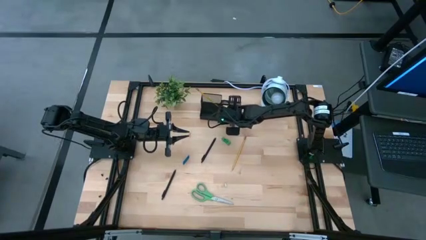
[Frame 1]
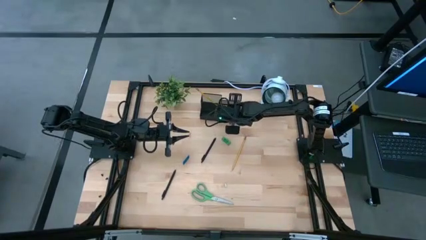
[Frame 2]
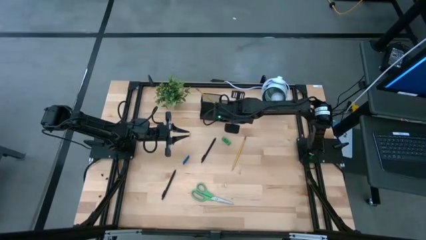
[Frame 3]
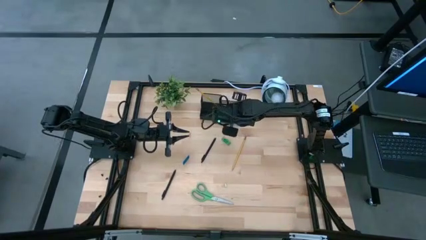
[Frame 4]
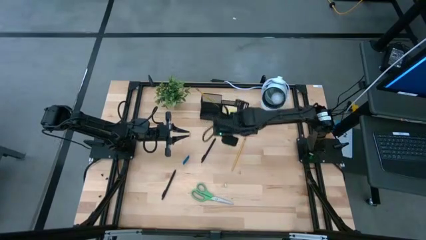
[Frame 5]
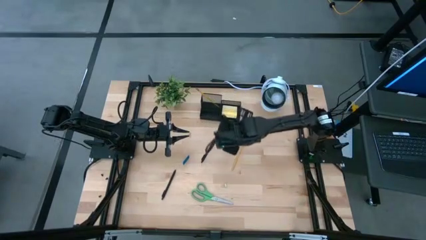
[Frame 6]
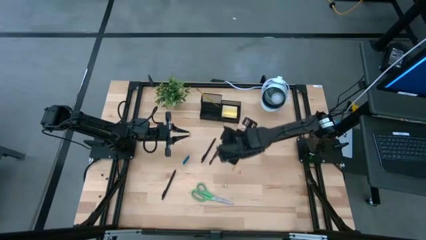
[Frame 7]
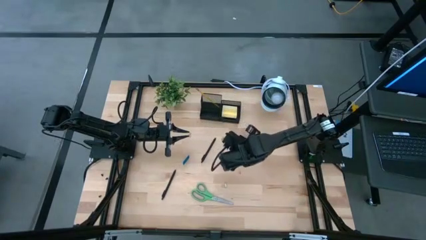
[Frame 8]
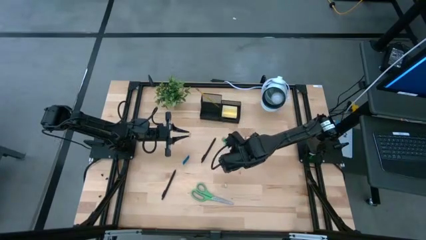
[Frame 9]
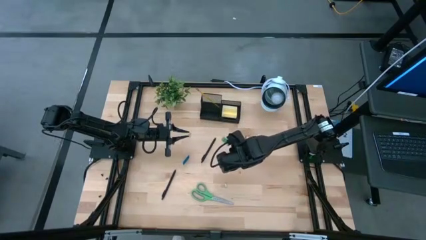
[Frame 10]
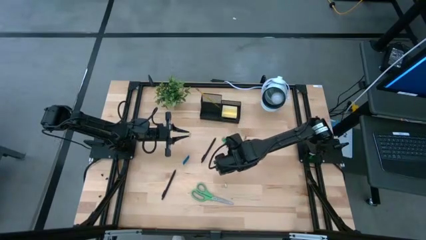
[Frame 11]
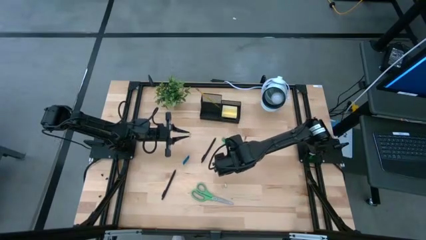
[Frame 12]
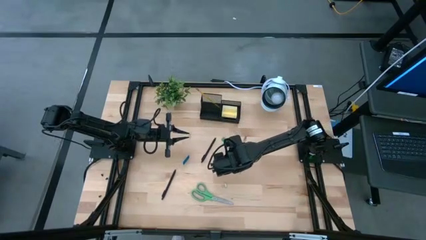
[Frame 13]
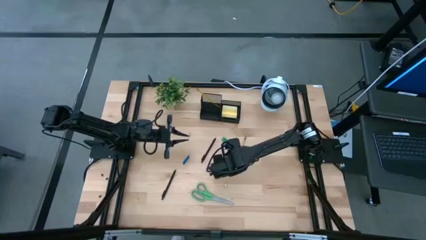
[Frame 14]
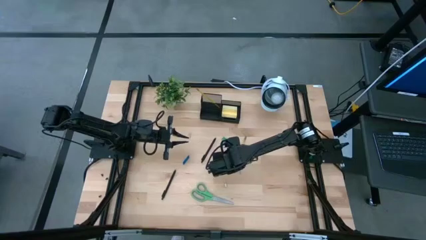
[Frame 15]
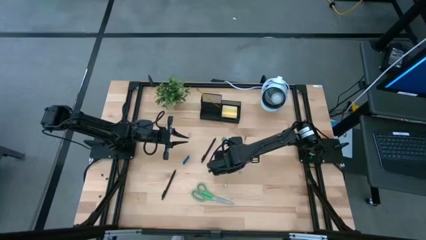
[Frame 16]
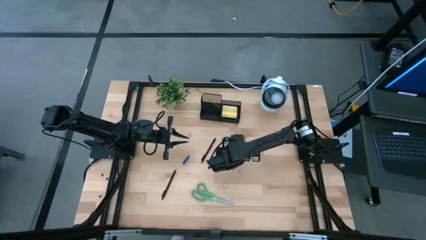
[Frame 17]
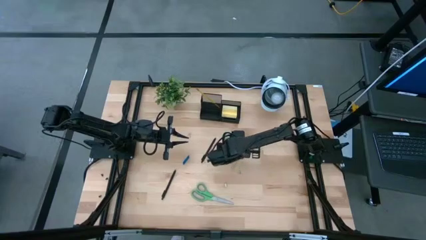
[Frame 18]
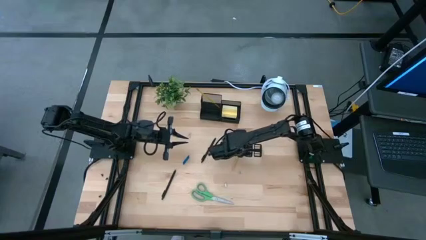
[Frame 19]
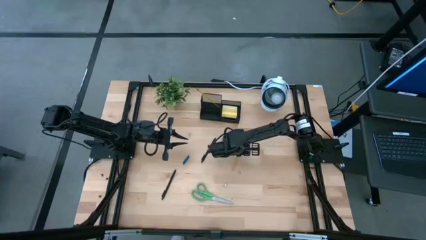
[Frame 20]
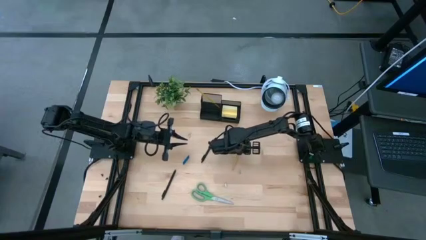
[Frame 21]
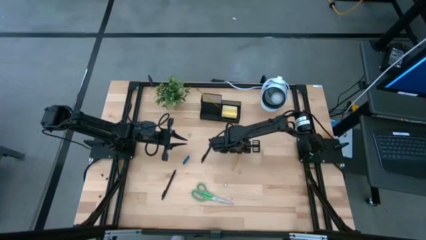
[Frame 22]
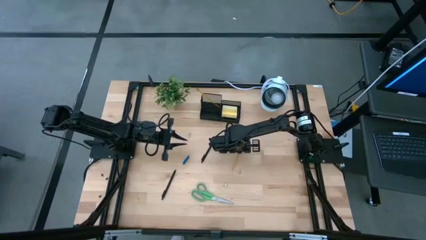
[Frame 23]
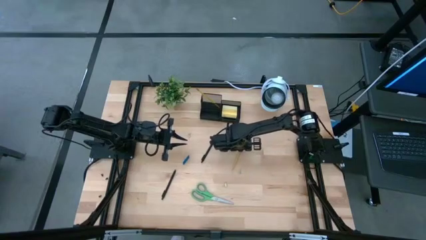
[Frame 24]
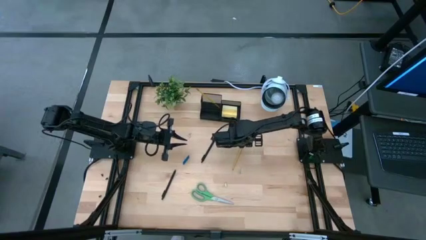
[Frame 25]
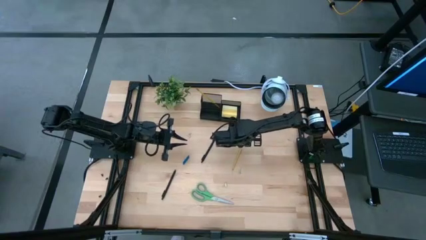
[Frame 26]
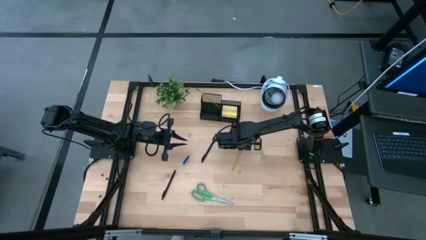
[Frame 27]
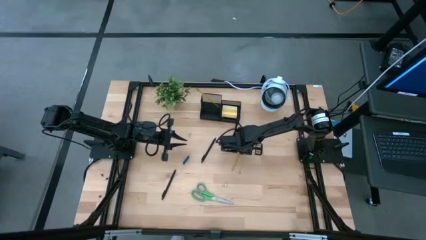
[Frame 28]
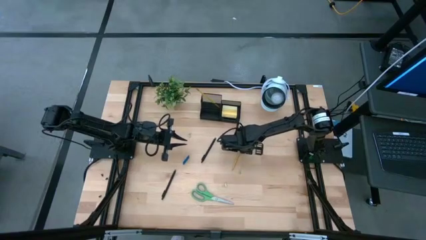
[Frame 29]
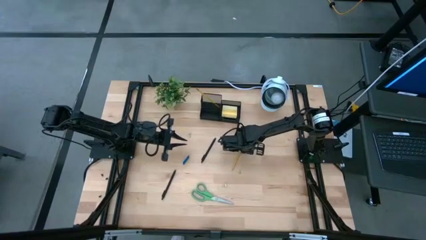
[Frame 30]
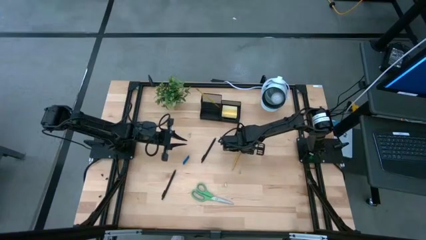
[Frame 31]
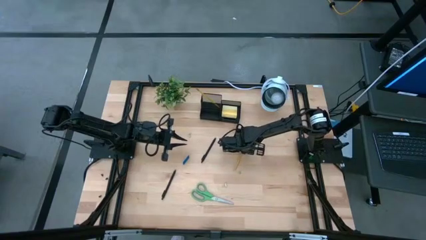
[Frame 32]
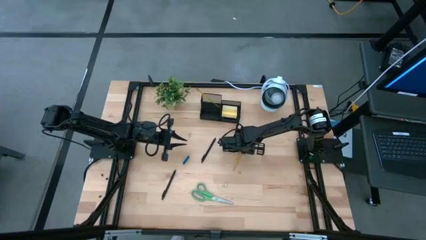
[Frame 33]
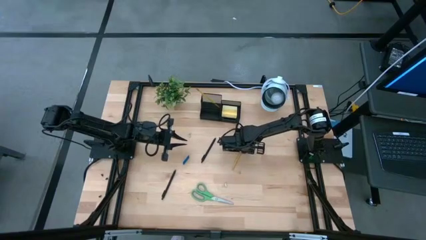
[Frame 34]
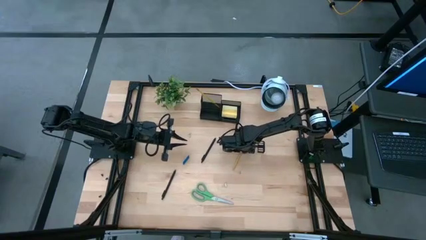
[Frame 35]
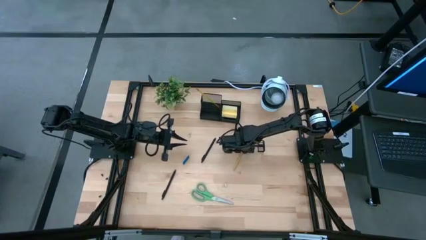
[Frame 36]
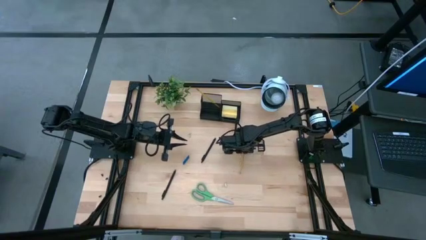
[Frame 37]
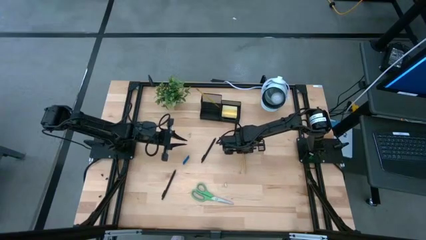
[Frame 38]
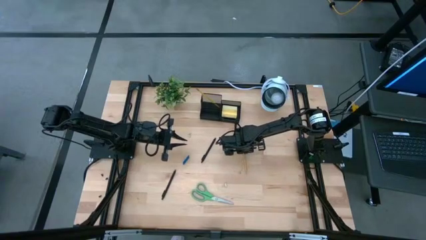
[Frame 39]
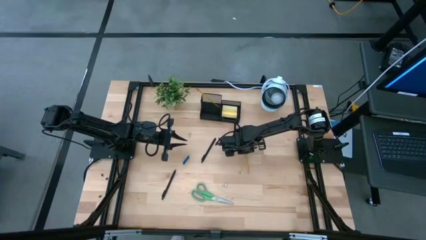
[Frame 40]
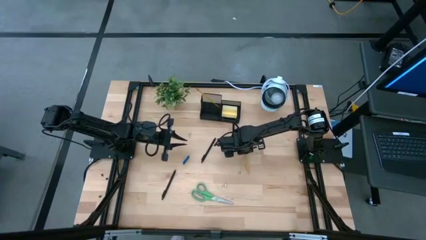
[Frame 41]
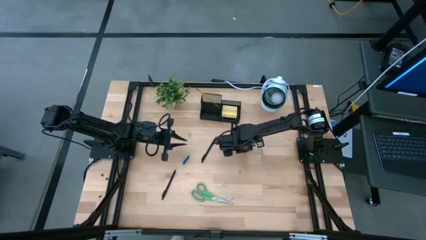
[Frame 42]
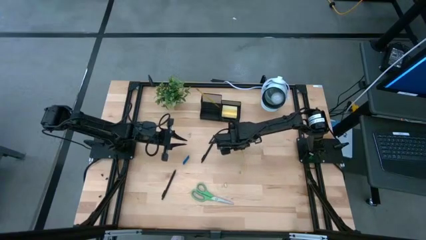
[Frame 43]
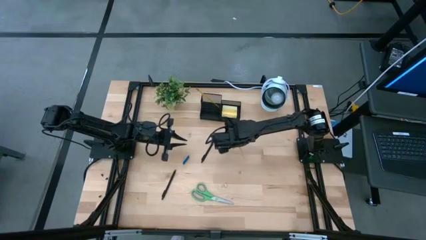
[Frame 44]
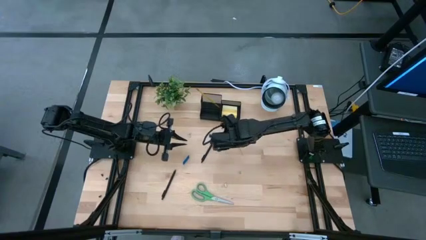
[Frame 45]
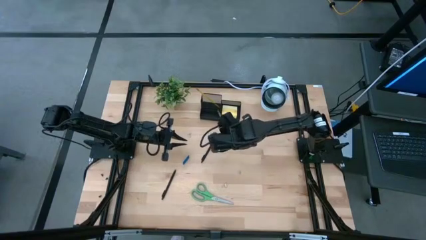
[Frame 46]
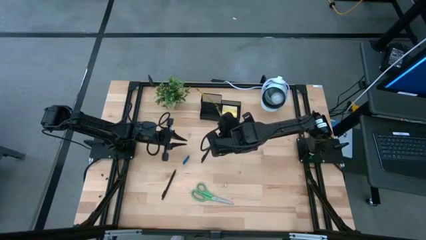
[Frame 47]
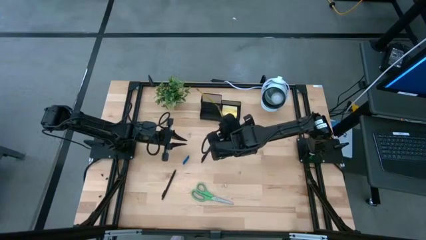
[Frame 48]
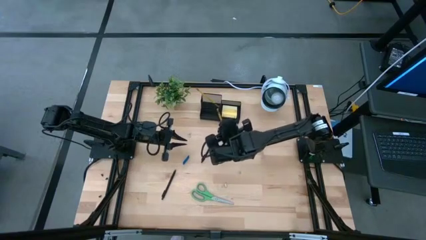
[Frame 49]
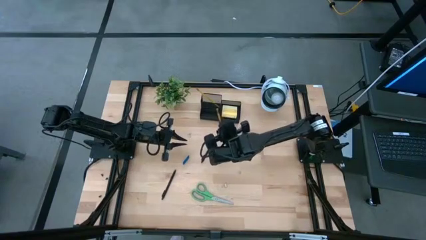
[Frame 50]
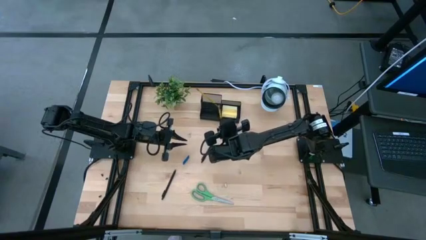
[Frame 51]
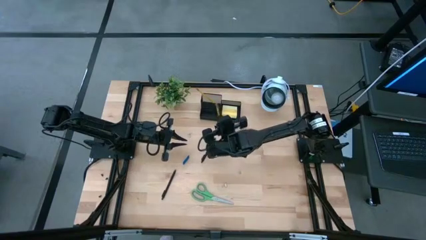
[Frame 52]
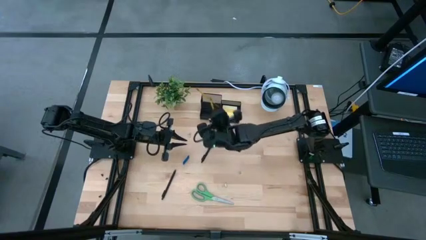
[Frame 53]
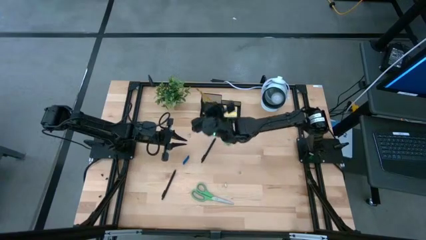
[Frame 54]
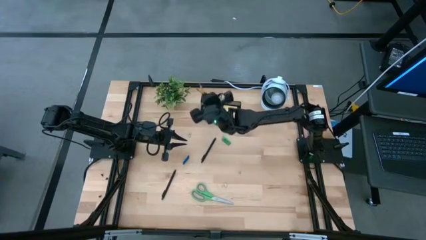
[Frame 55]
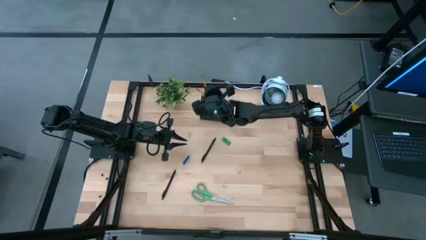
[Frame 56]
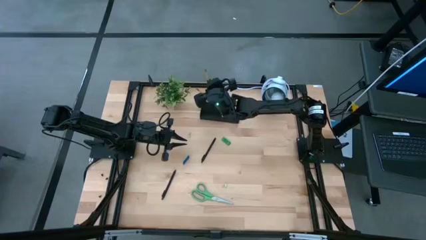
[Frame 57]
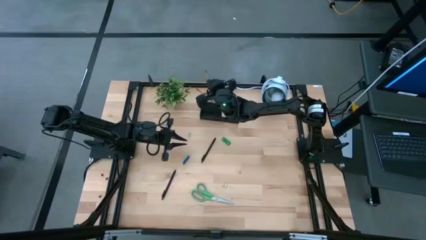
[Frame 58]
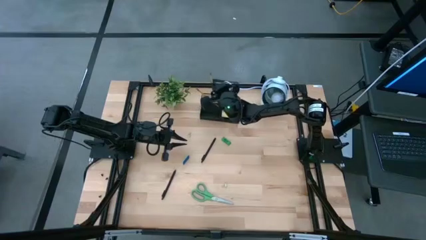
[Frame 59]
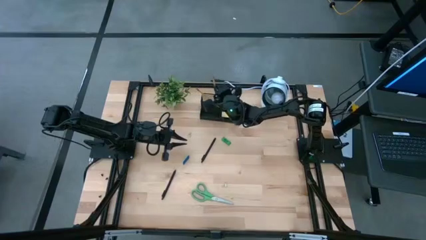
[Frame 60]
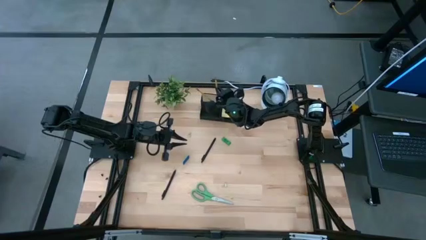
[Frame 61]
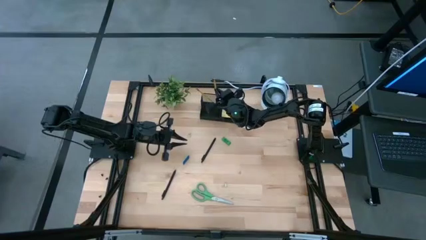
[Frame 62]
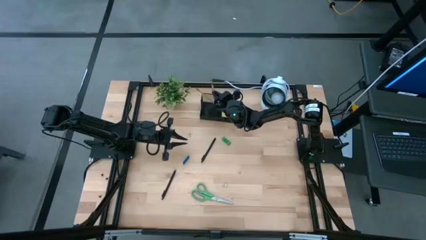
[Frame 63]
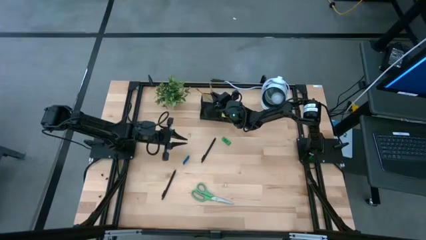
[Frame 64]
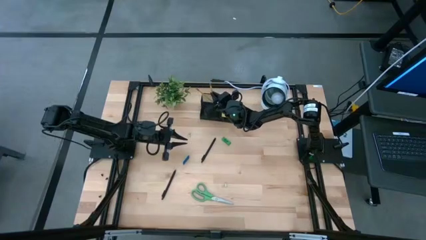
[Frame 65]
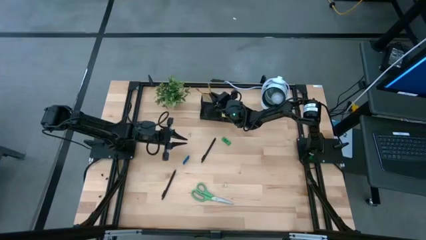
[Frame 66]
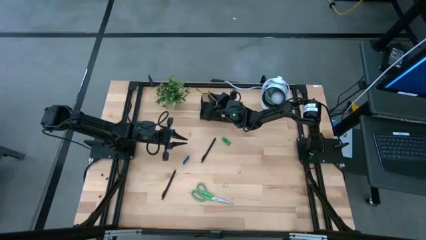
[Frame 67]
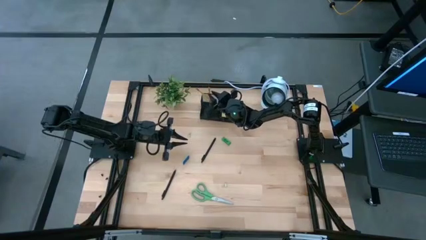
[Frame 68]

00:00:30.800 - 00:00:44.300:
Task: Pick and place office supplies into organizer
Put the yellow pencil into the black organizer
